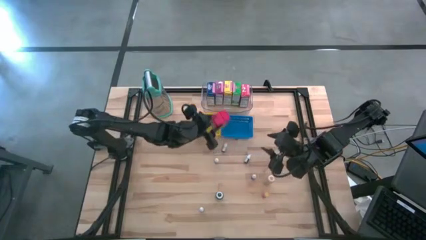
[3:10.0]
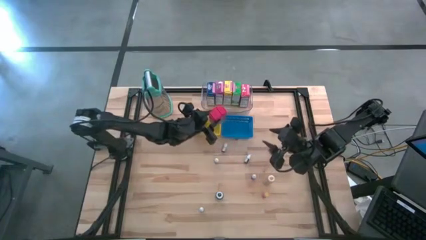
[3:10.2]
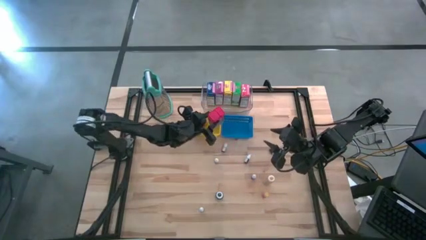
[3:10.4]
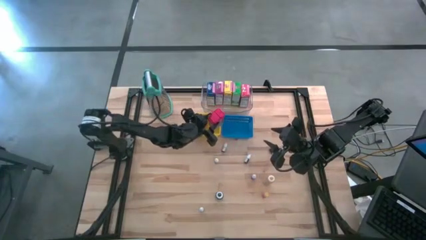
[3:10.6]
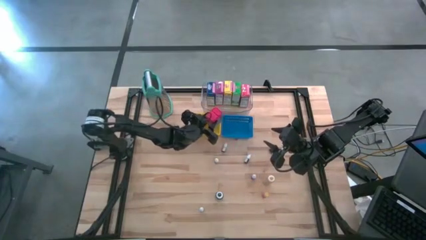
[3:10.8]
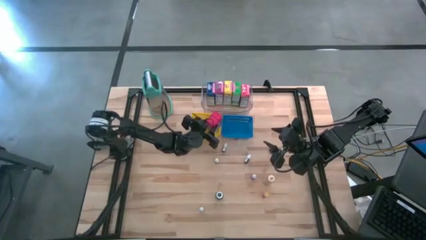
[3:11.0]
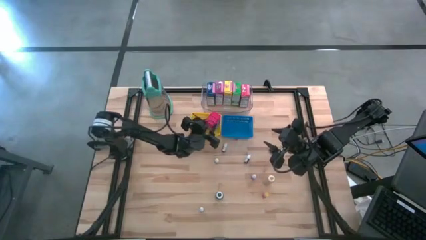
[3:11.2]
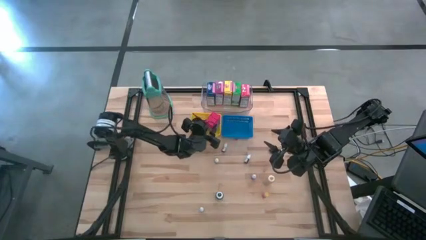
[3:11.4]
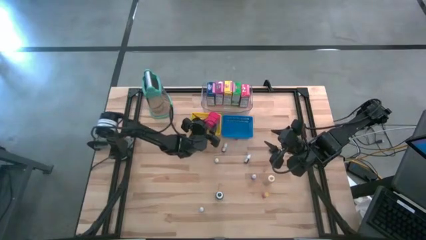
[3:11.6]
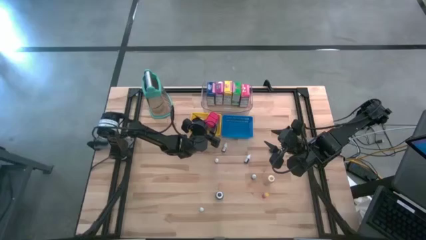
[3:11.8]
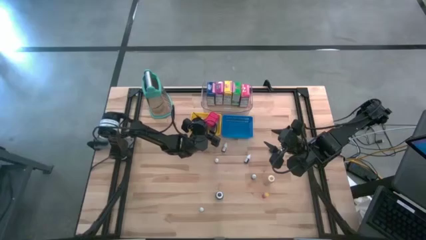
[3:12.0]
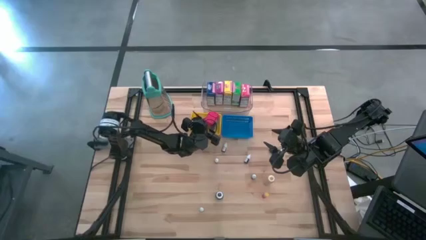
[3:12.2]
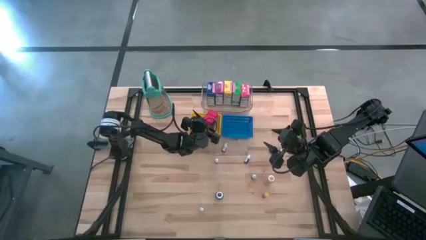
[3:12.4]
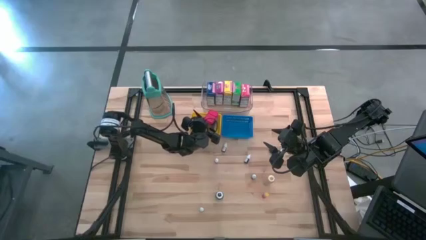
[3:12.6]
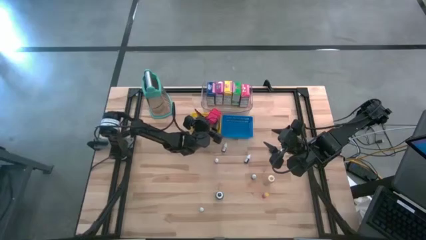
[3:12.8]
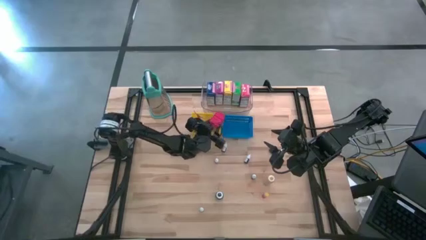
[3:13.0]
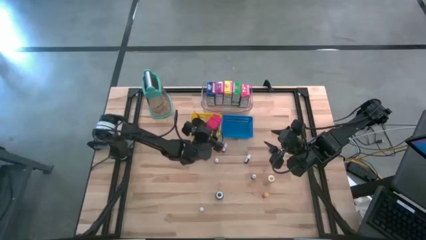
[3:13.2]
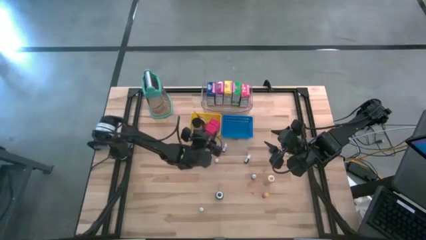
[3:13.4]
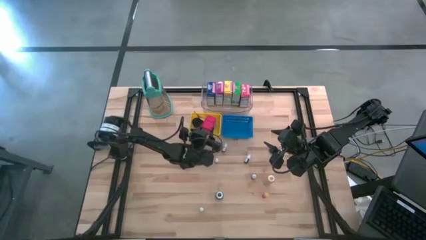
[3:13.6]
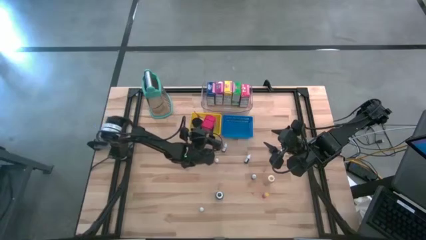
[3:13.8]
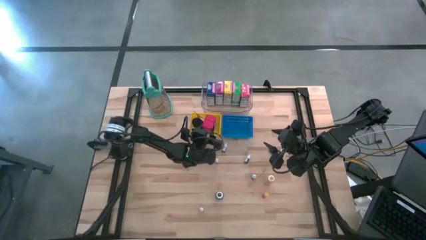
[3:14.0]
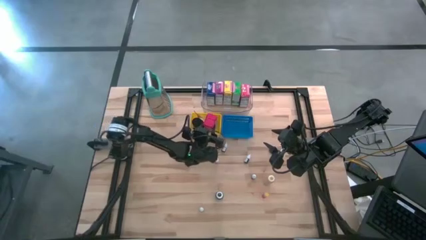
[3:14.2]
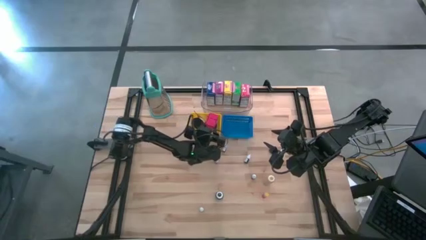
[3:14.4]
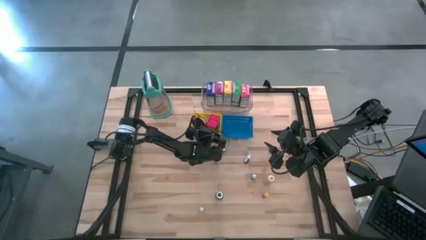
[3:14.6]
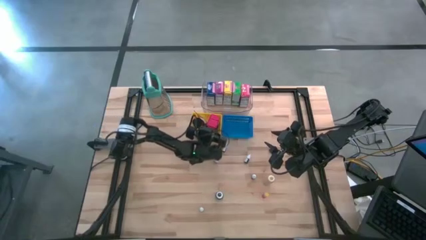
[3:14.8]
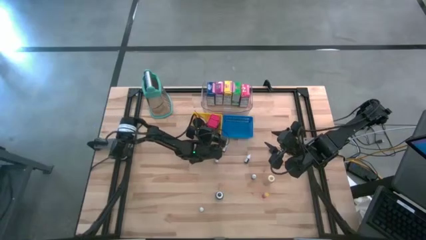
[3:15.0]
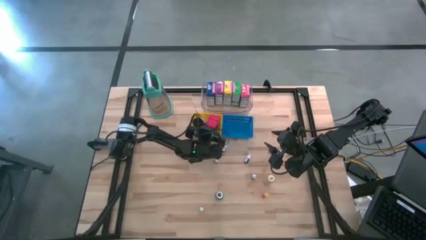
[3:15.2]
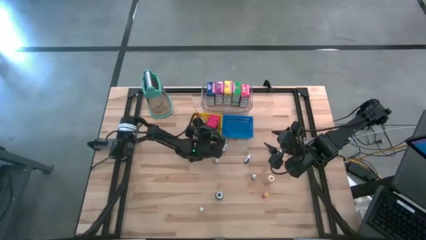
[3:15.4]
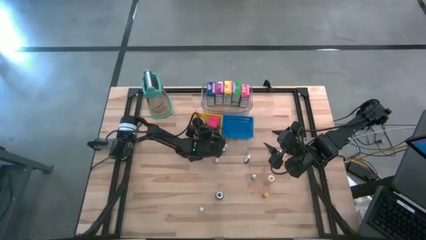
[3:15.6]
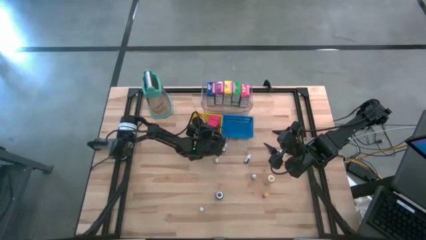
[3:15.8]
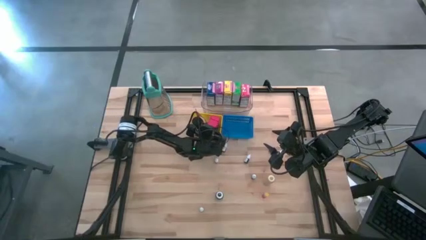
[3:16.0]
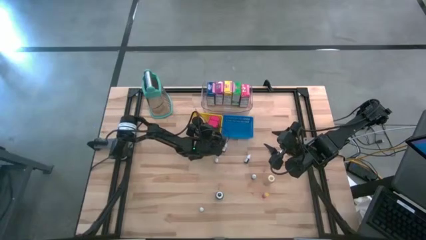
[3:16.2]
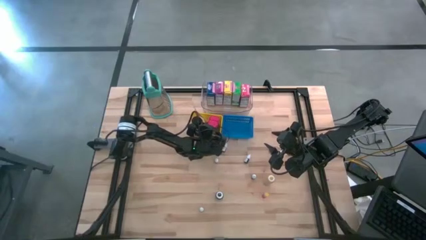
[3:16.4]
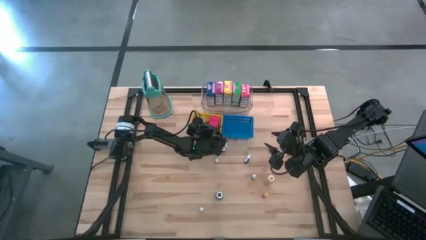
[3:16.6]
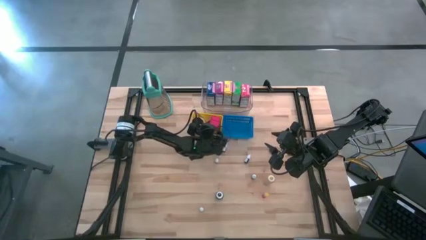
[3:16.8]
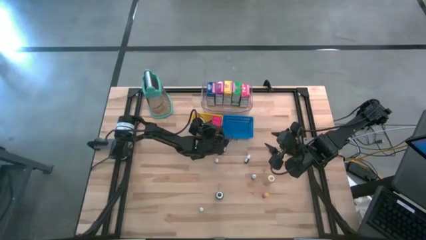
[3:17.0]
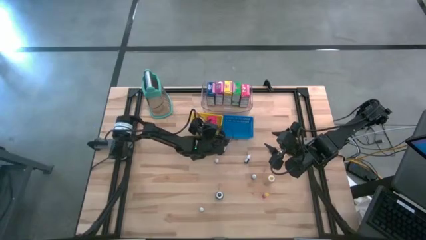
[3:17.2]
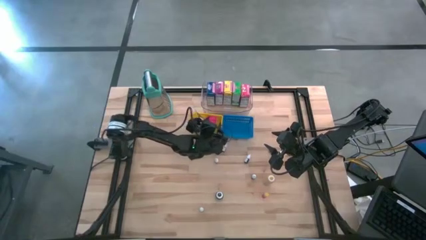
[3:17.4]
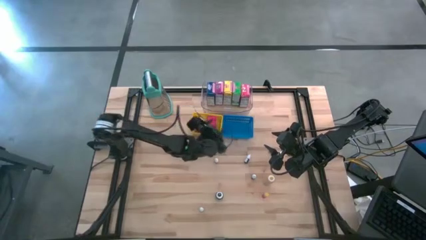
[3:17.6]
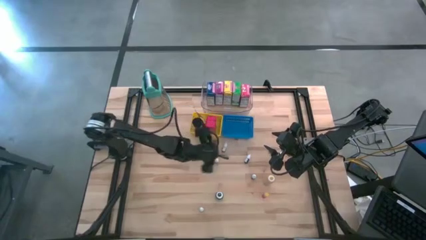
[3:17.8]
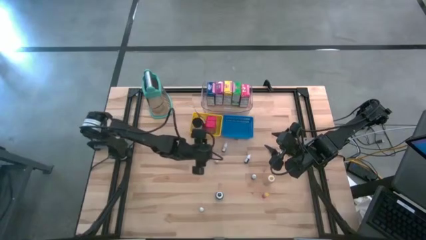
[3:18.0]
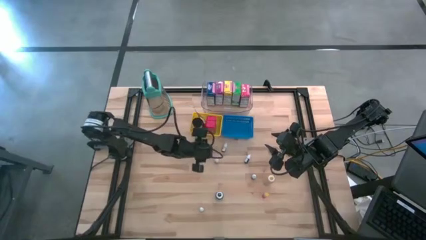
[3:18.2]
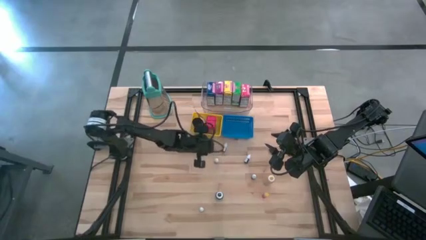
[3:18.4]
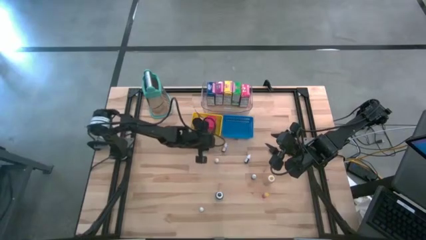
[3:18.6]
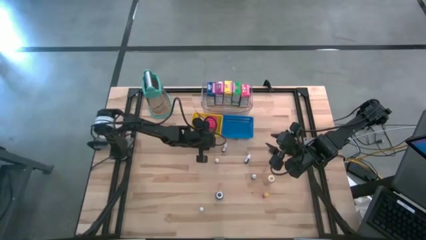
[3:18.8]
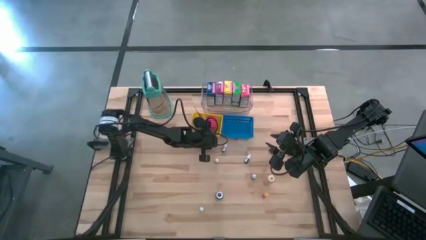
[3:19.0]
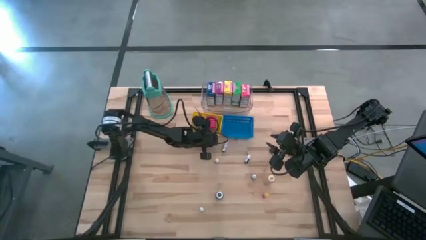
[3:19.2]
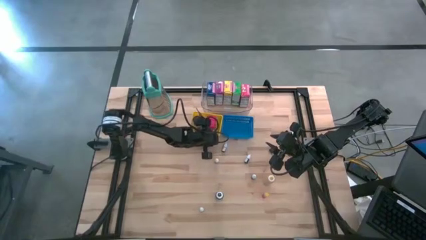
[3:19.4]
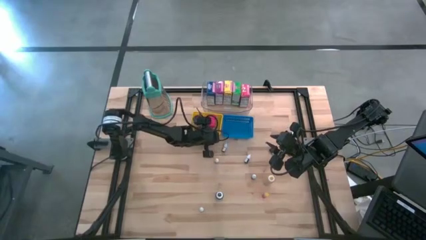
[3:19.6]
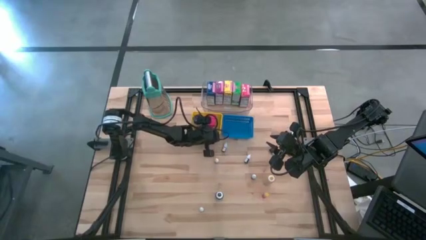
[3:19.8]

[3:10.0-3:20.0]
Task: Pick & Place Kitchen Items
Put the red seasoning can into the yellow bin

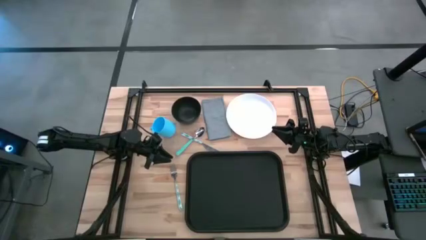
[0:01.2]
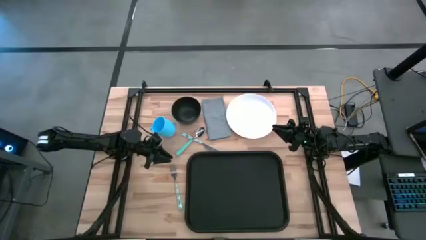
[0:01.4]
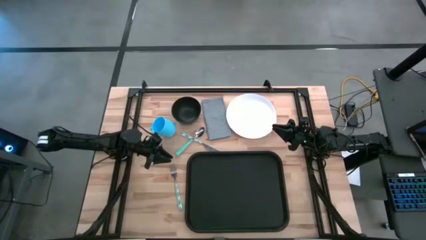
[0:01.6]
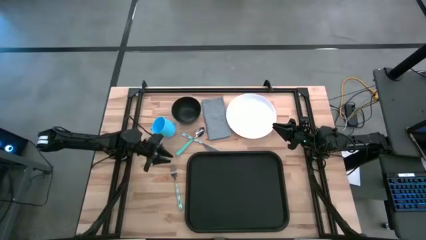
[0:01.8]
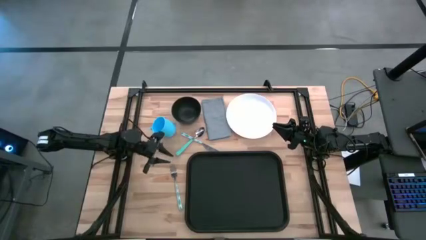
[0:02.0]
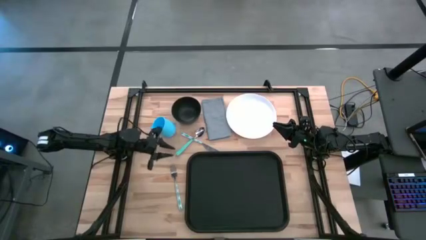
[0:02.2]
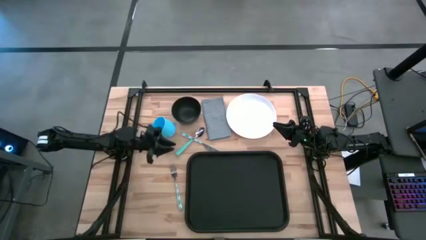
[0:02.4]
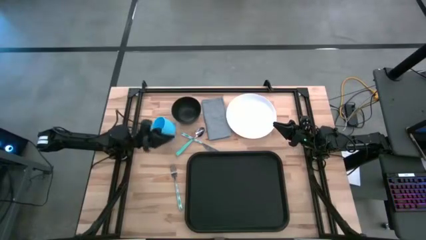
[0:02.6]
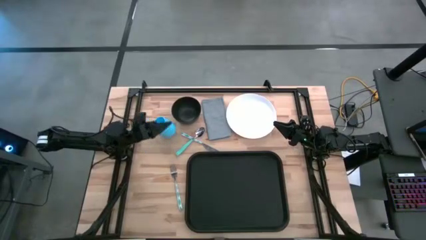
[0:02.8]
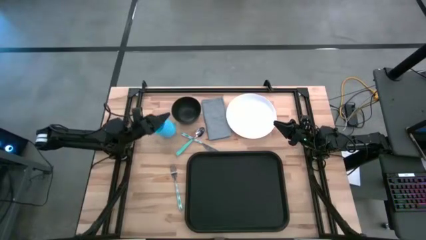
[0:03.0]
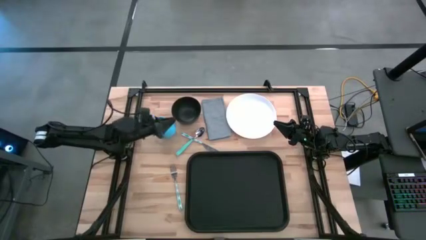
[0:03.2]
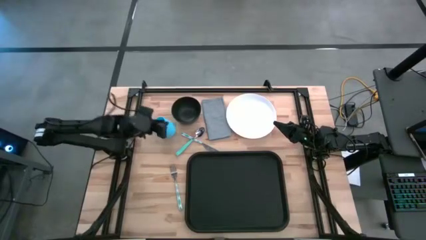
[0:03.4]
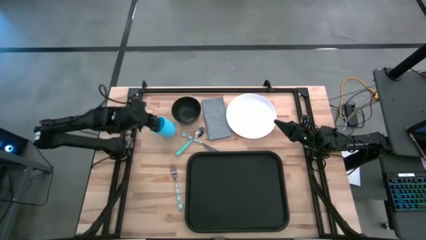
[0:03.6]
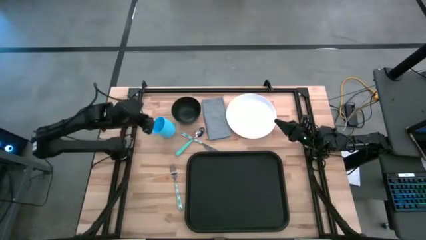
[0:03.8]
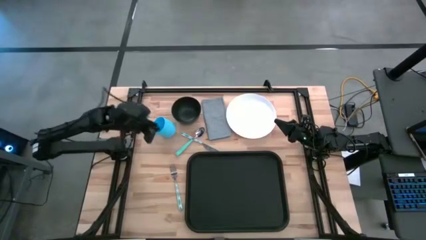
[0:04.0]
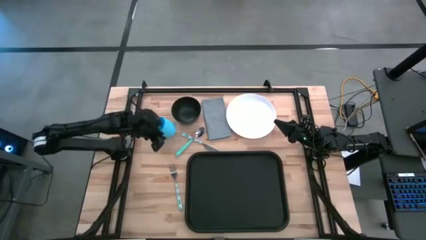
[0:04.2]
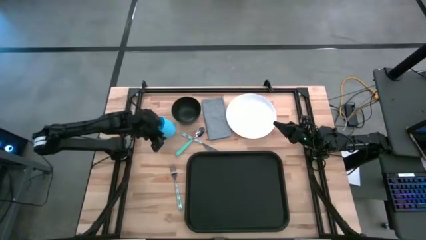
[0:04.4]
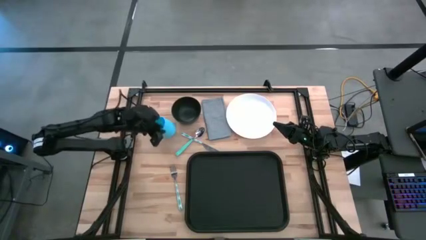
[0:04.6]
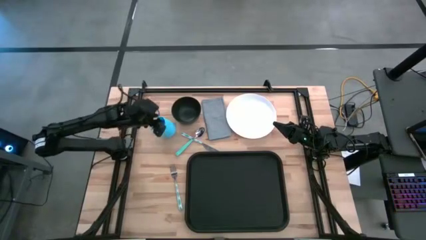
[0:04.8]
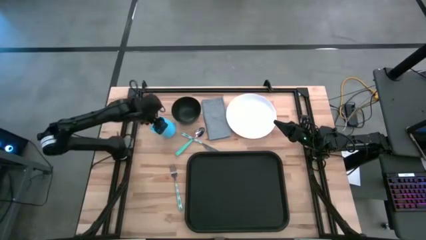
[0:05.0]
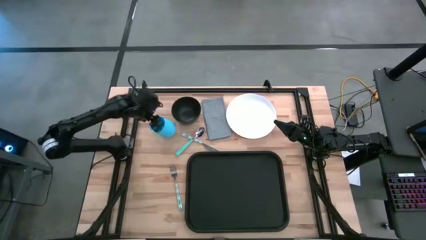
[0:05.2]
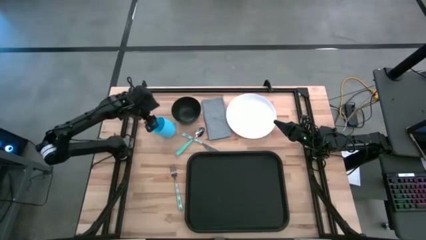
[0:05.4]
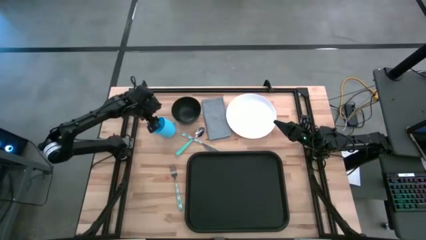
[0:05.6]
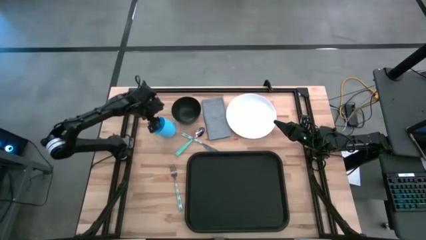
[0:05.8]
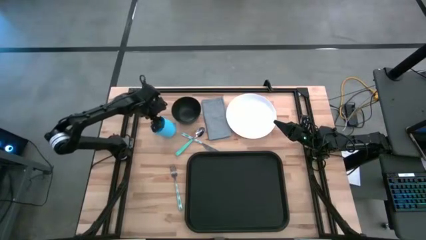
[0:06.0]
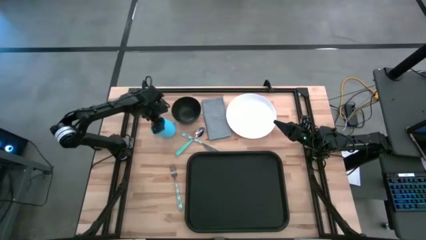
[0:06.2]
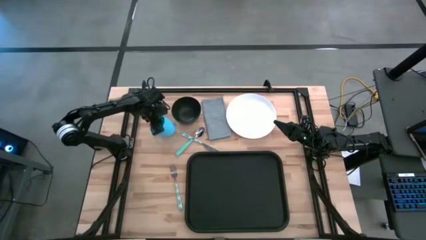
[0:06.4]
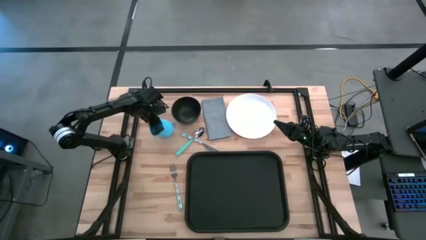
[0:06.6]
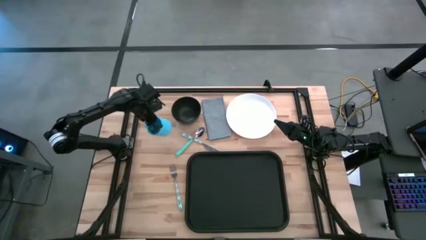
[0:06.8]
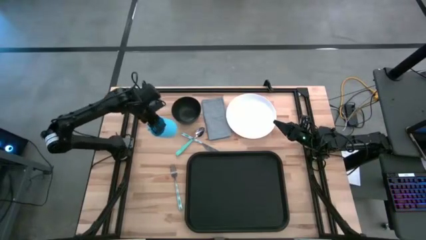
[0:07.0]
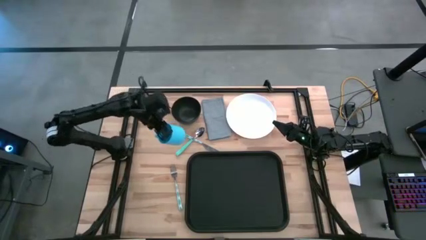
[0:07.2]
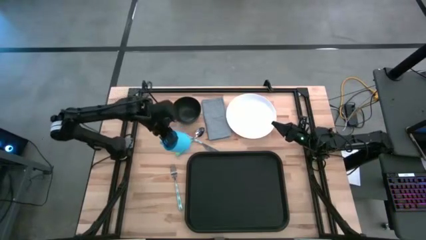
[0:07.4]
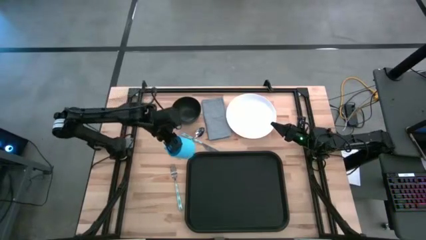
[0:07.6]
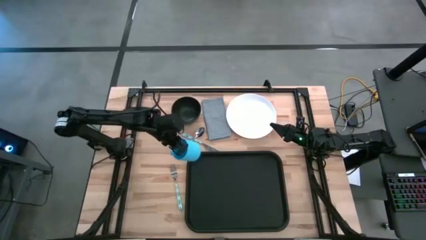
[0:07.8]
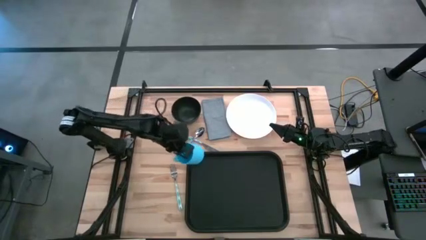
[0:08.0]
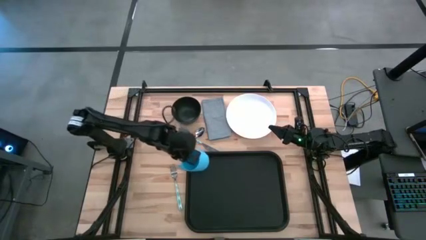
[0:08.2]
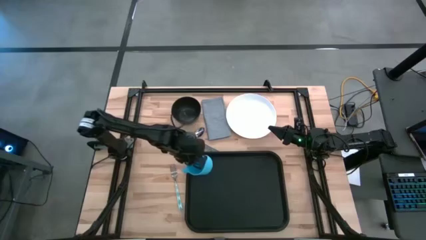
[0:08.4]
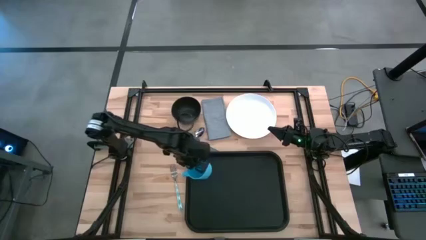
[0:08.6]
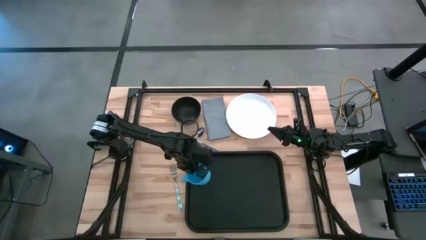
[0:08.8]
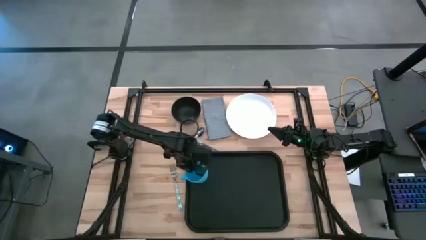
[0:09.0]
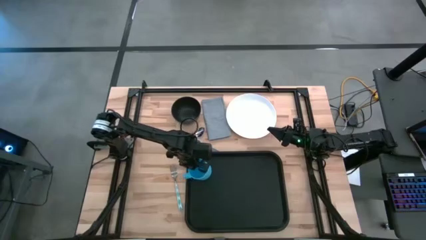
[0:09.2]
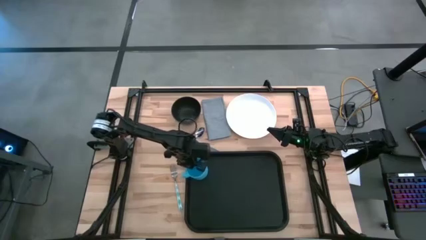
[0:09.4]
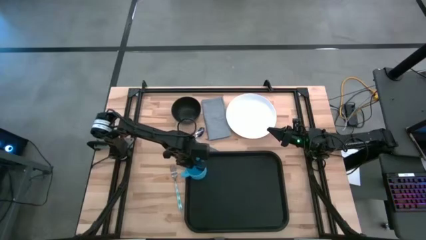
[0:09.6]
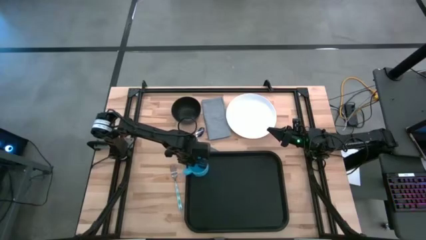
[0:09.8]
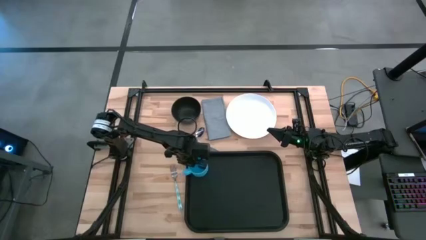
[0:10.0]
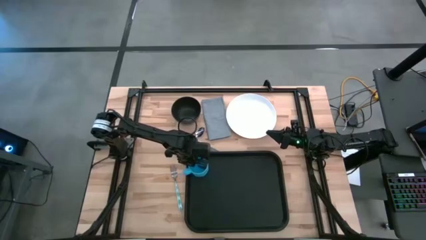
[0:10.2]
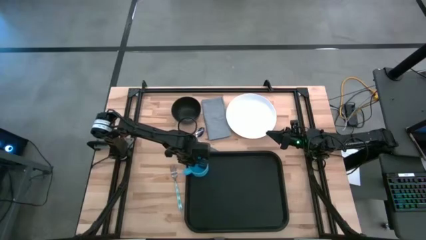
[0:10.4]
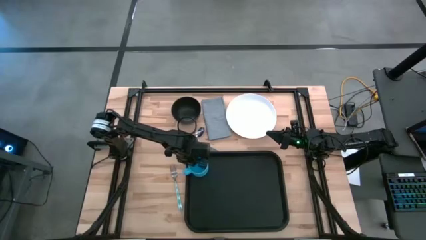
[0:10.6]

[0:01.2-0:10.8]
Task: Set up tray
Put the blue mug on the top left of the black tray
